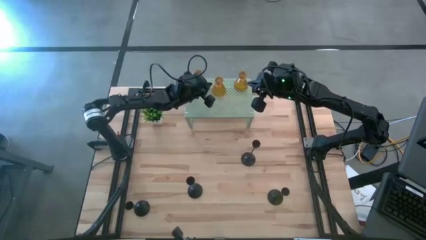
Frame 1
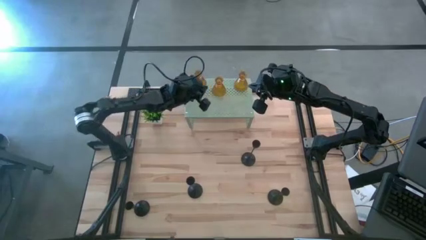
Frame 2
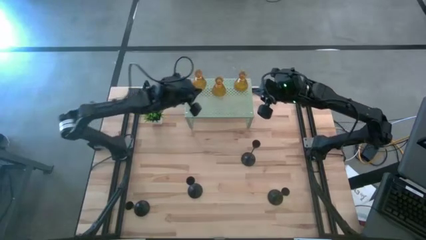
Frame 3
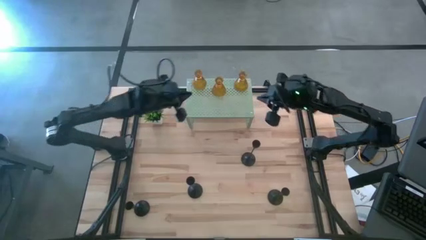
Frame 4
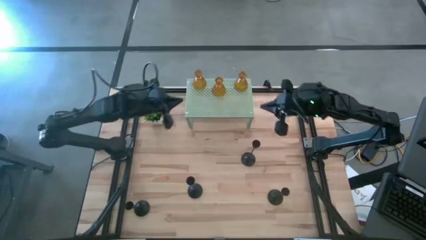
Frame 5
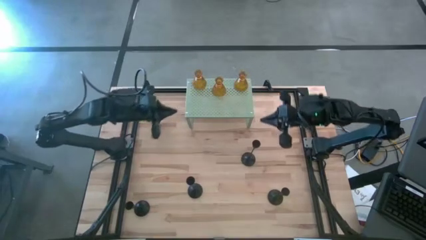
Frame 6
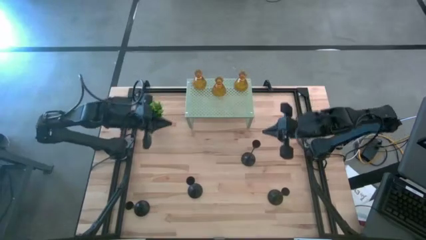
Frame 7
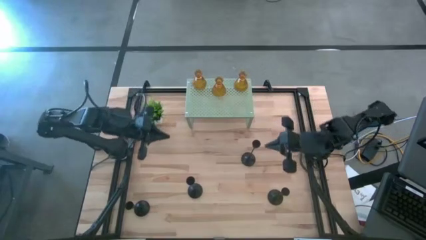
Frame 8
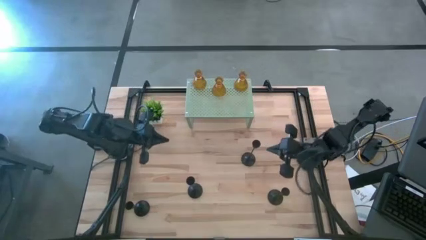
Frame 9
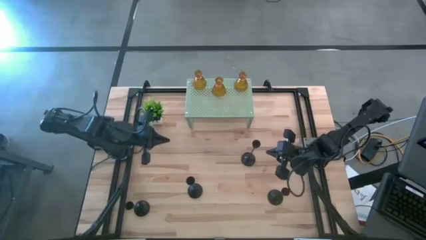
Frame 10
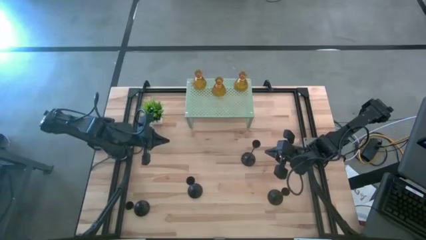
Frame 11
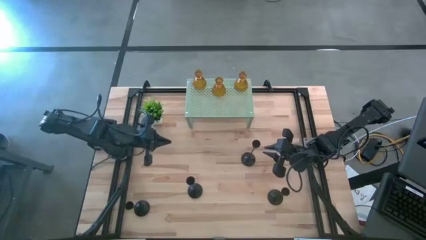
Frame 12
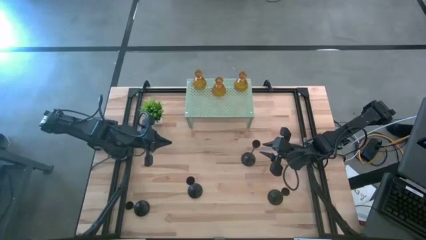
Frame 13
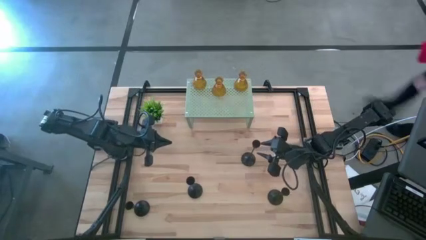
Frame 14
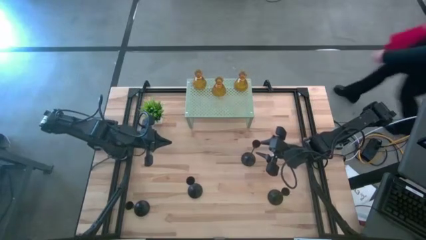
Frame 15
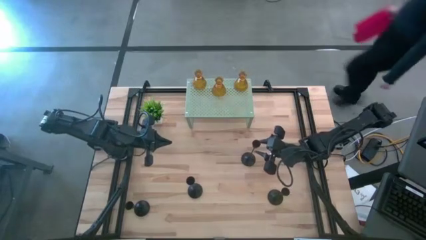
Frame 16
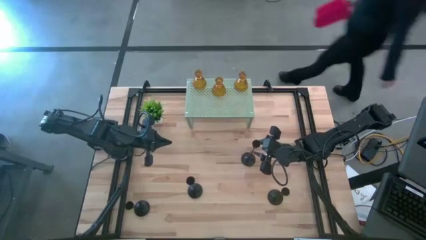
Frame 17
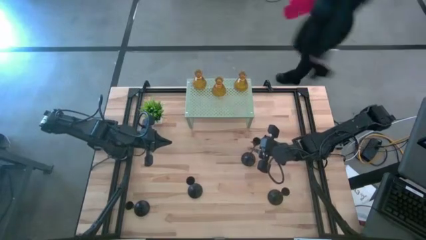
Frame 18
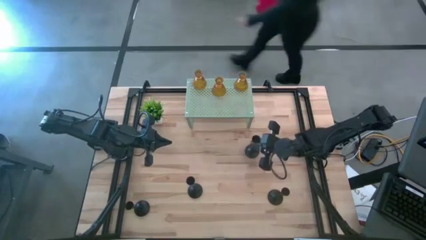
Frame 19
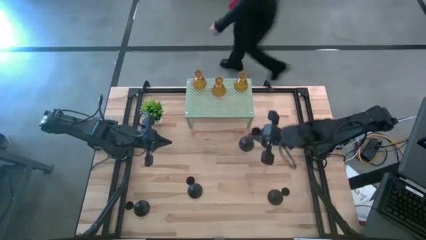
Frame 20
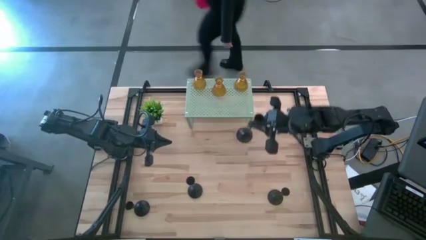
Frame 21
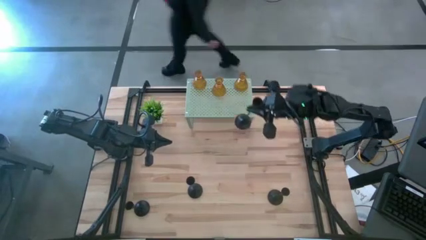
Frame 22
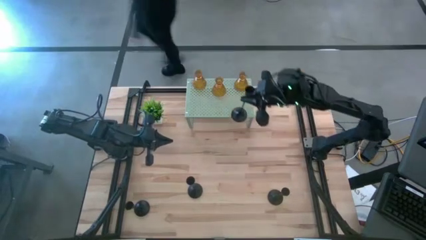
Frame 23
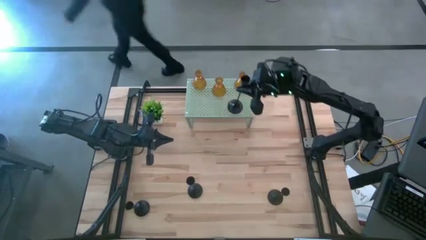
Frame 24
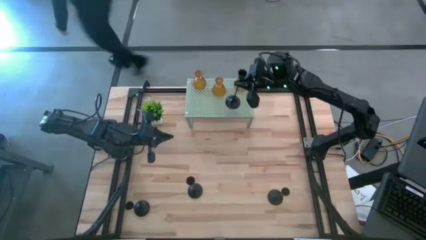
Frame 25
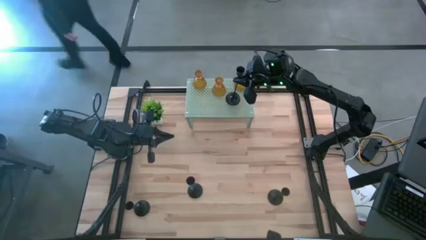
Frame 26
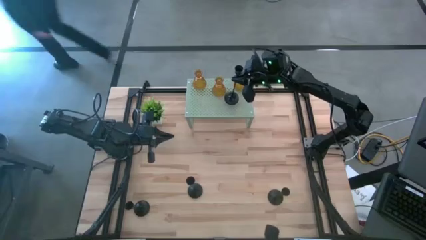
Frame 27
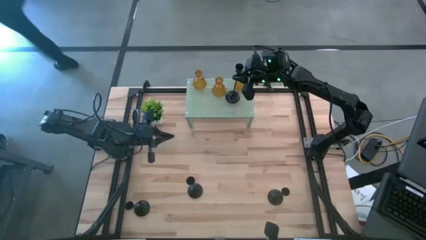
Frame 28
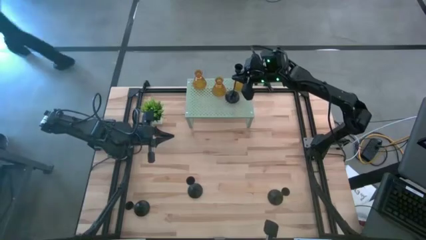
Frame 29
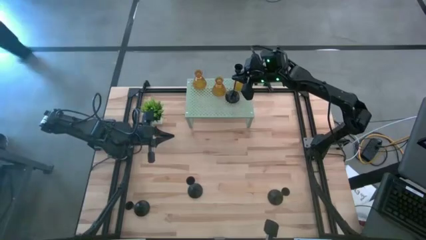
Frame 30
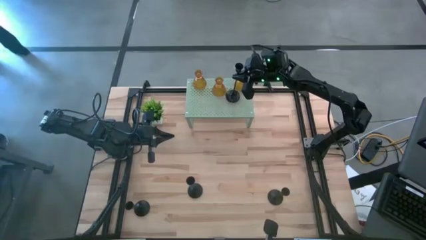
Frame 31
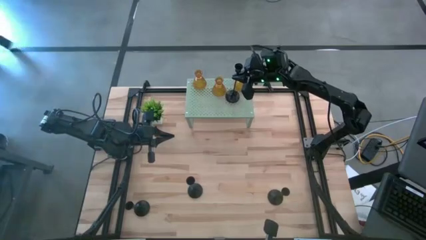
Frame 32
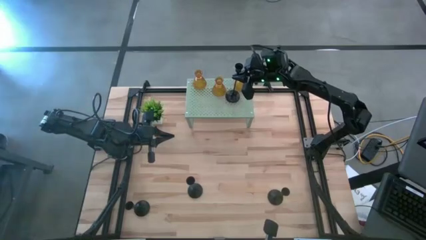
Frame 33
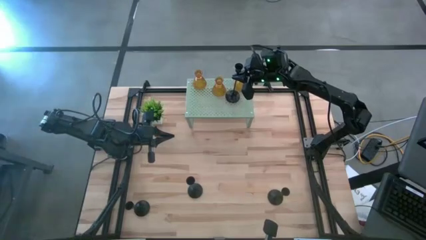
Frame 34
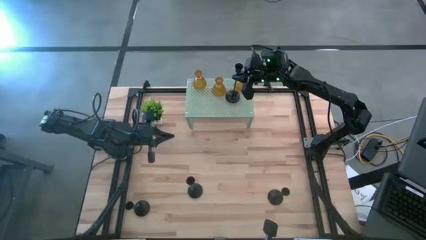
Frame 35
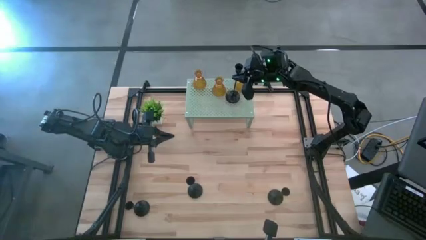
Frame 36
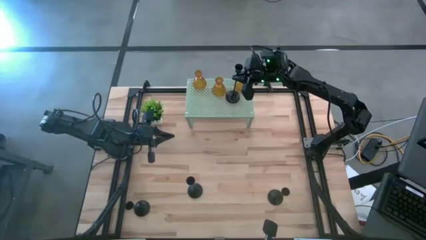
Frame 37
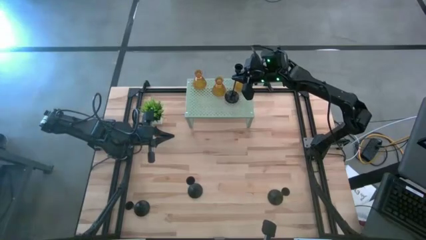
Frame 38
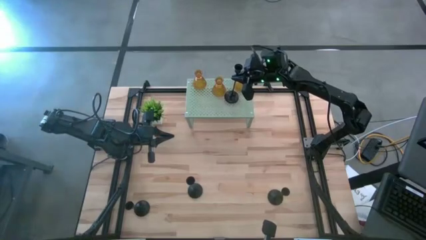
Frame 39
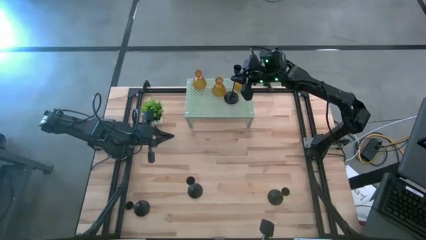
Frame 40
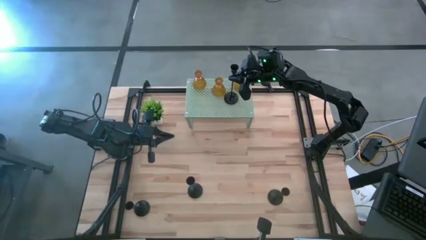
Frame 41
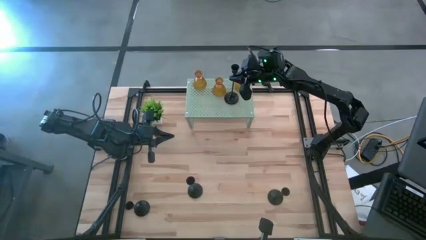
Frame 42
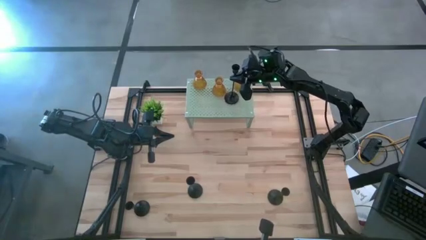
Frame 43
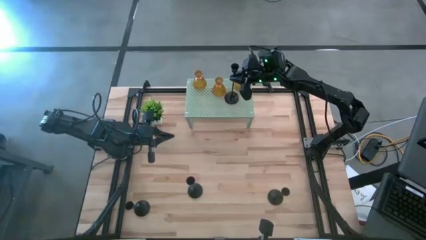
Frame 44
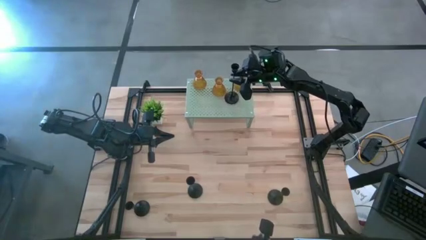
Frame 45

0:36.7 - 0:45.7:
Task: Pick & Place candle stick holders
Put the black candle holder on the shelf

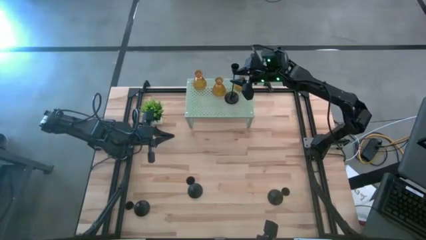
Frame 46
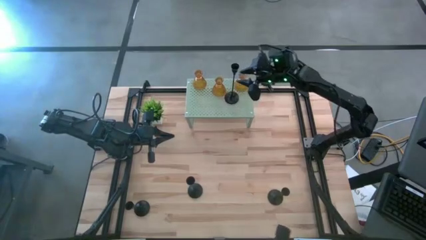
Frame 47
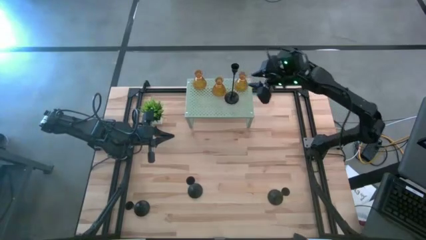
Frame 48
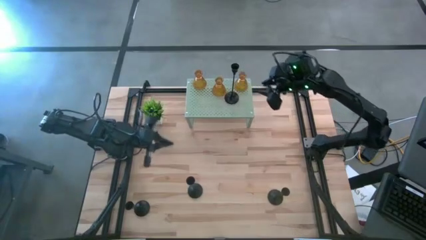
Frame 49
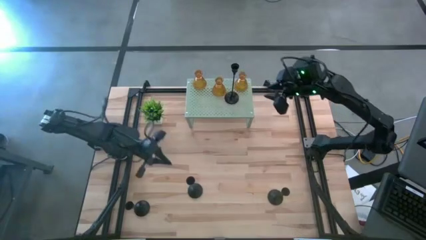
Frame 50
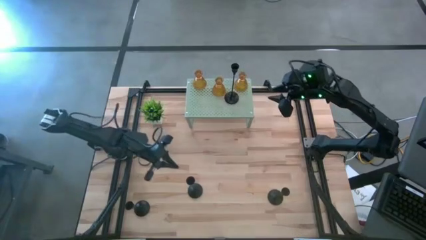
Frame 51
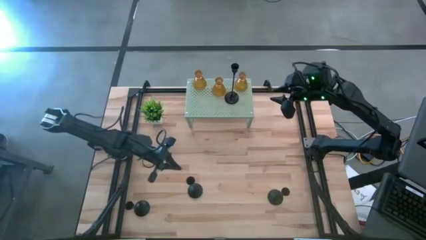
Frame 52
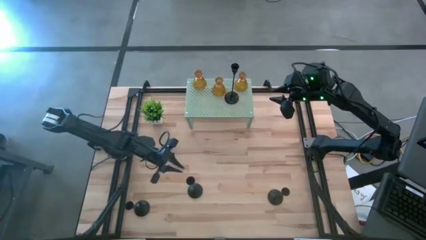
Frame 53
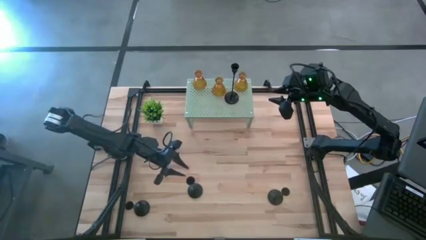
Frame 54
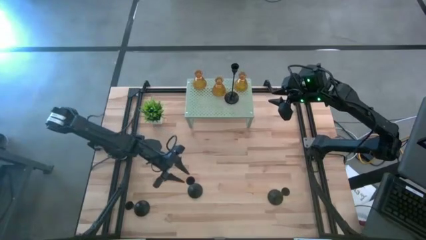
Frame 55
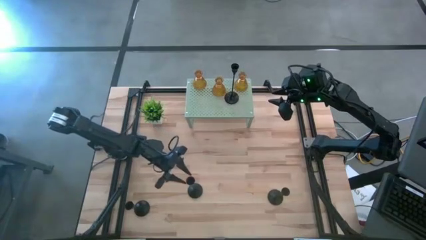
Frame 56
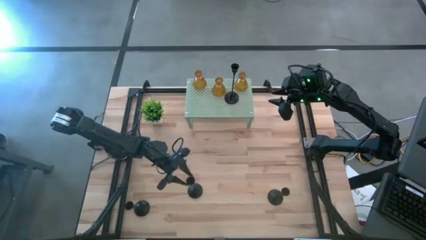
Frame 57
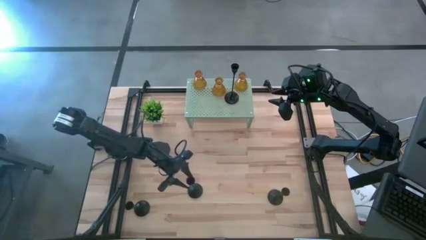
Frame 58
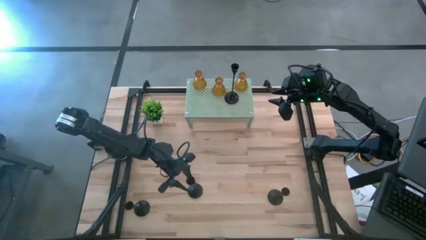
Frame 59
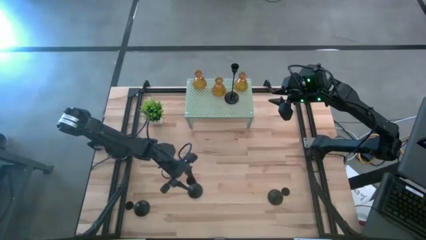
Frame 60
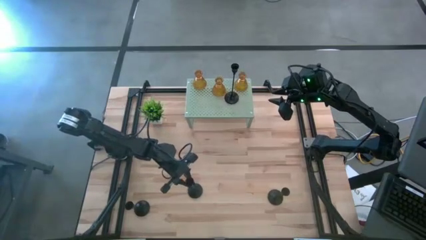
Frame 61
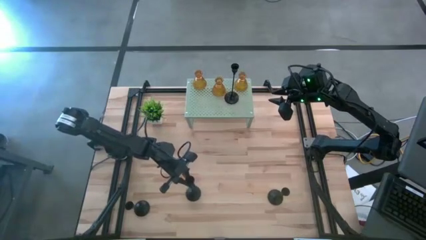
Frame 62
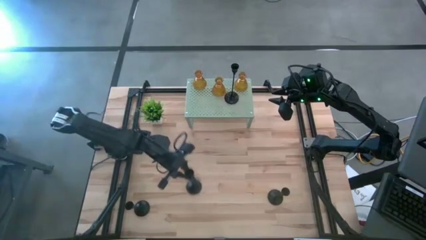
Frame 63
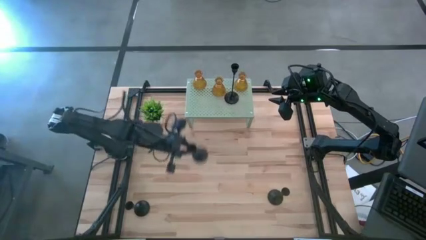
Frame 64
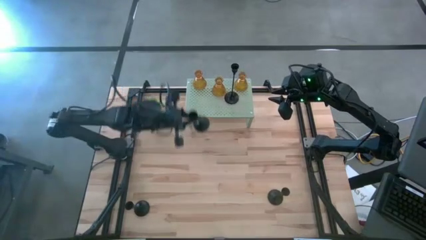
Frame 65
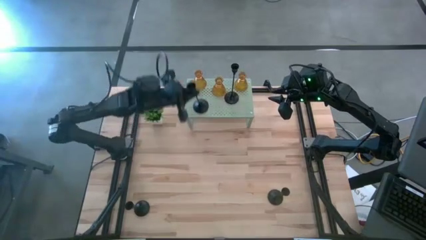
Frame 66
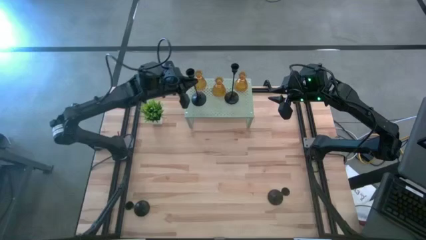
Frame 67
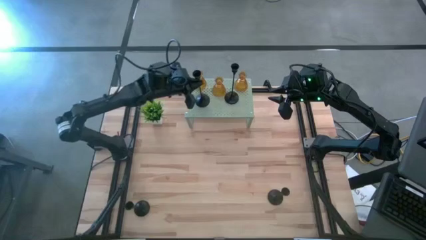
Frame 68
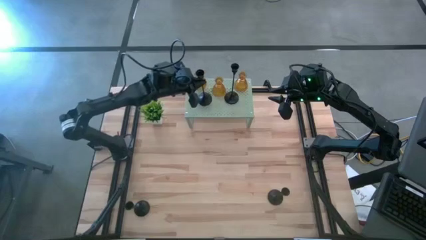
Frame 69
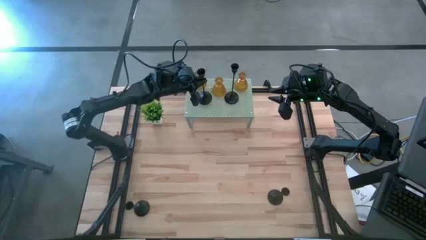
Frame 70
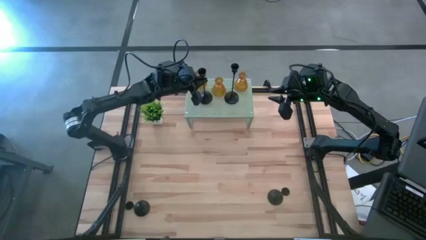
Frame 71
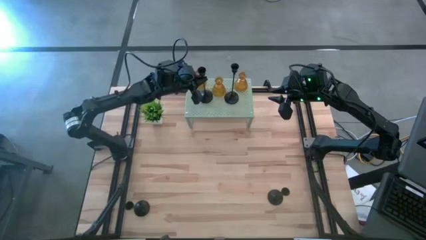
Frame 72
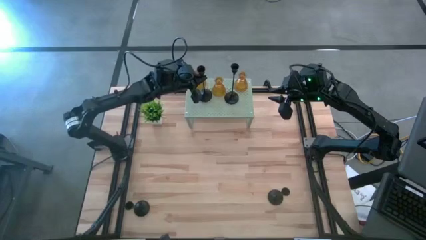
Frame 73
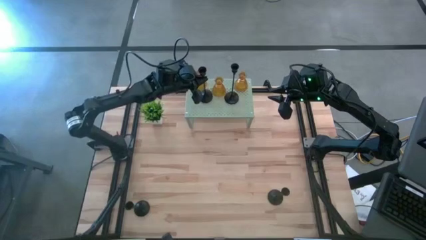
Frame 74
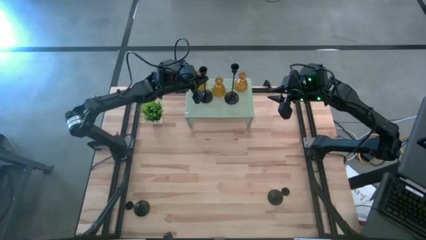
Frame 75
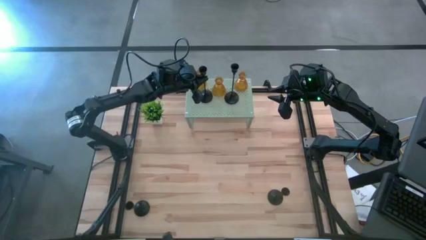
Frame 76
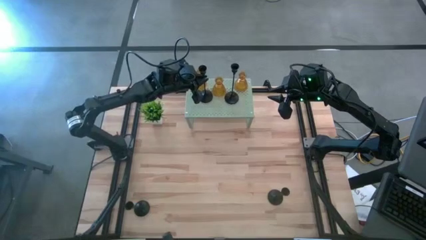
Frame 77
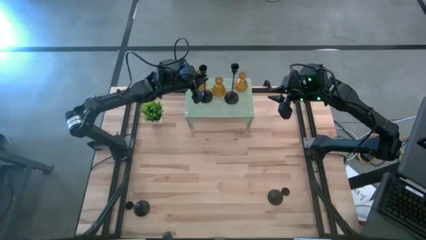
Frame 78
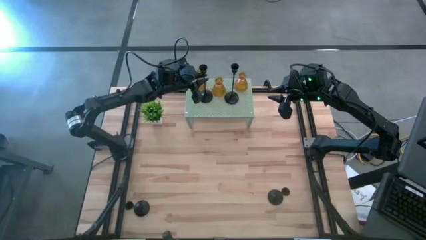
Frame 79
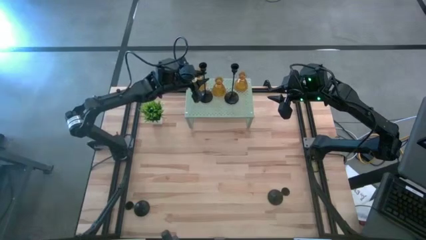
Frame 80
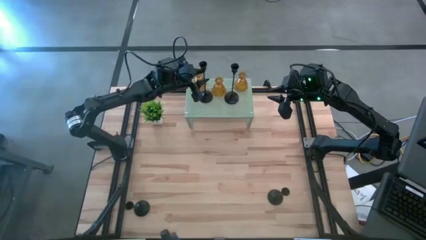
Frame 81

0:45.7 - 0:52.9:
Put the black candle holder on the shelf
